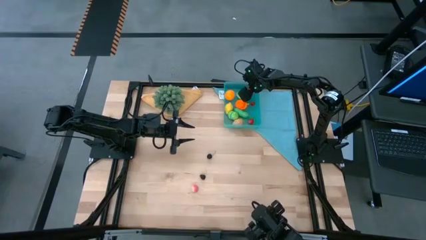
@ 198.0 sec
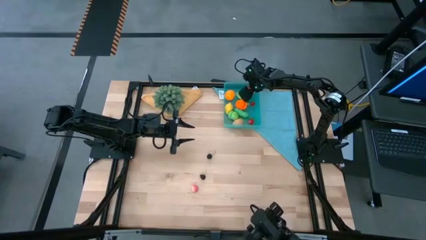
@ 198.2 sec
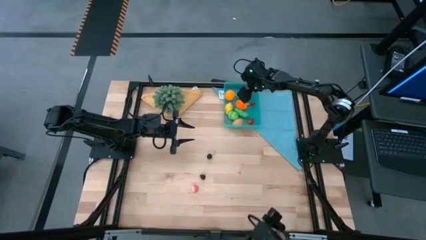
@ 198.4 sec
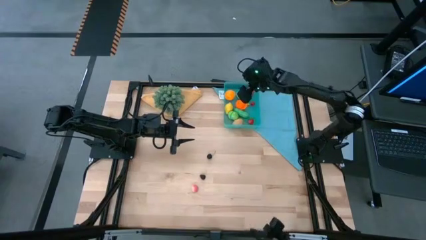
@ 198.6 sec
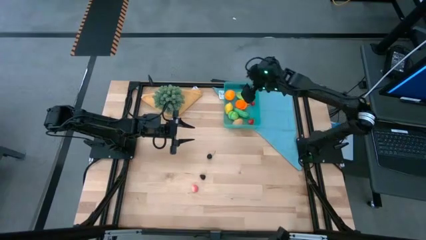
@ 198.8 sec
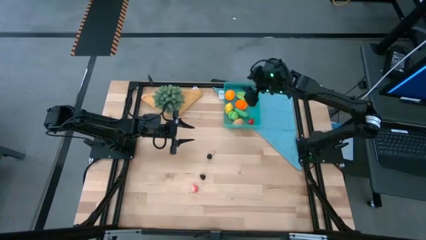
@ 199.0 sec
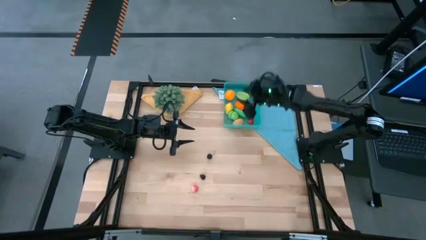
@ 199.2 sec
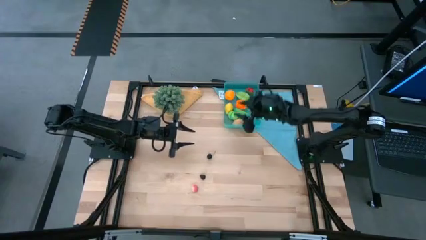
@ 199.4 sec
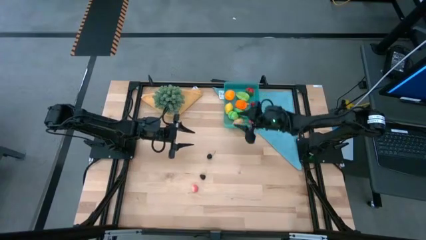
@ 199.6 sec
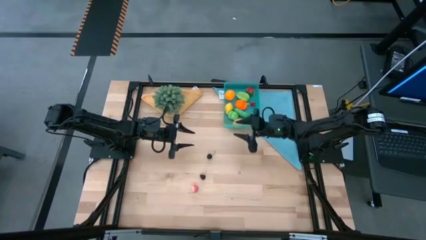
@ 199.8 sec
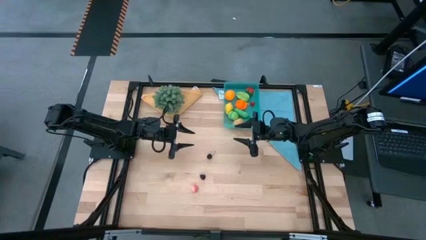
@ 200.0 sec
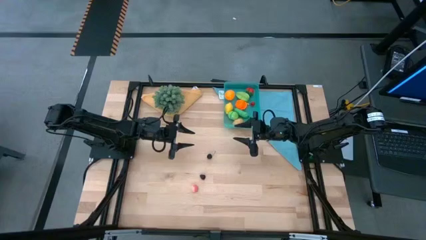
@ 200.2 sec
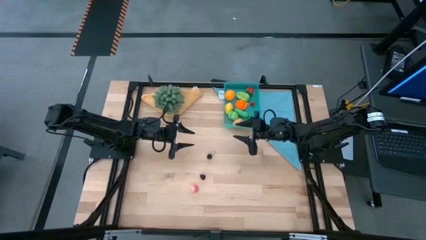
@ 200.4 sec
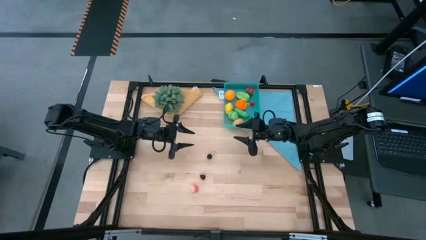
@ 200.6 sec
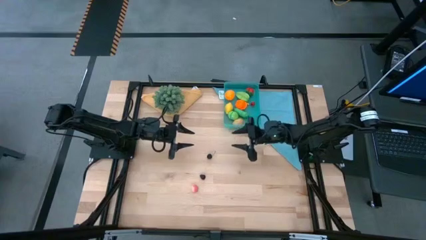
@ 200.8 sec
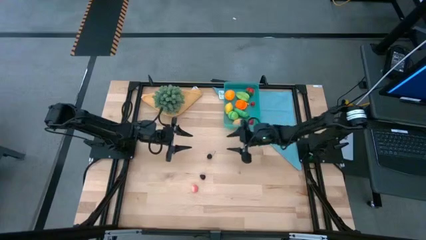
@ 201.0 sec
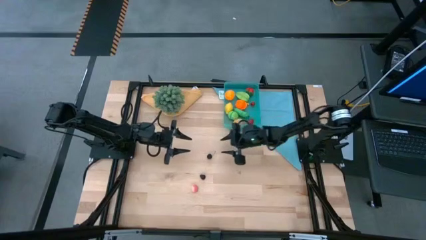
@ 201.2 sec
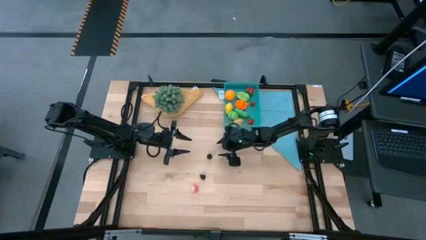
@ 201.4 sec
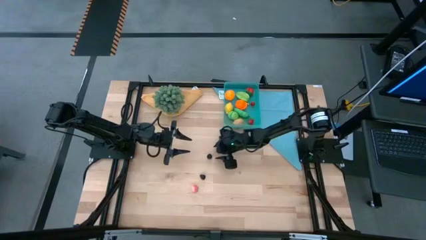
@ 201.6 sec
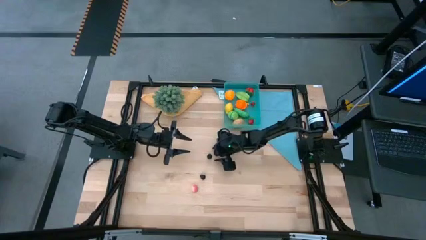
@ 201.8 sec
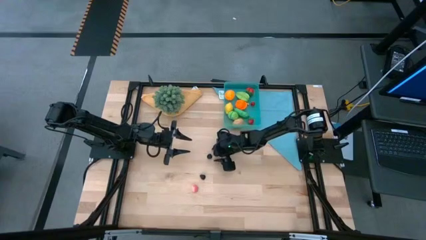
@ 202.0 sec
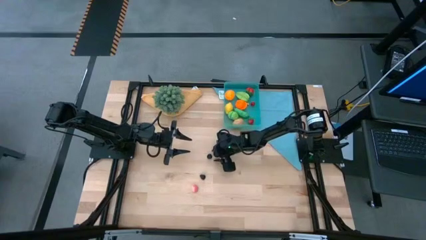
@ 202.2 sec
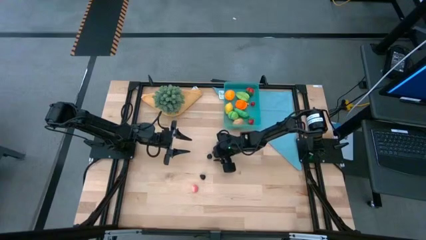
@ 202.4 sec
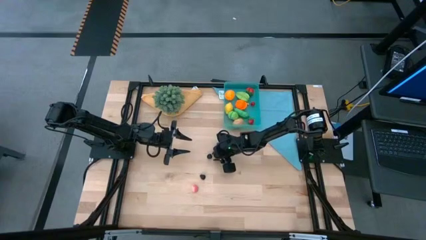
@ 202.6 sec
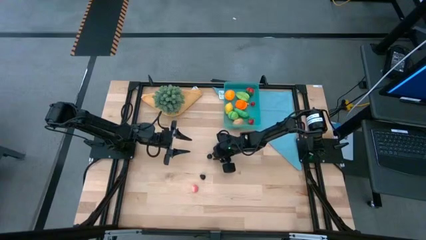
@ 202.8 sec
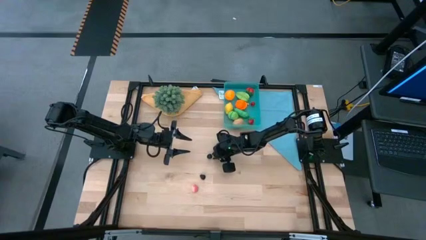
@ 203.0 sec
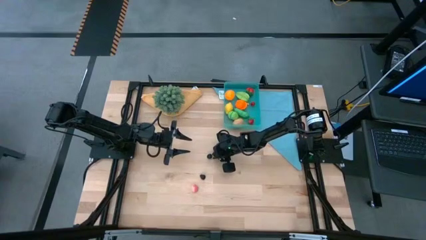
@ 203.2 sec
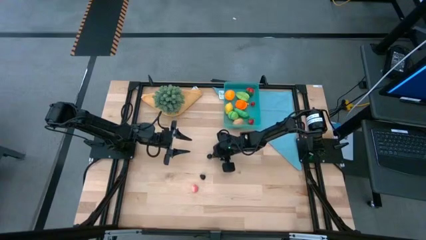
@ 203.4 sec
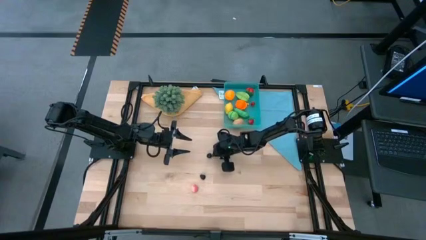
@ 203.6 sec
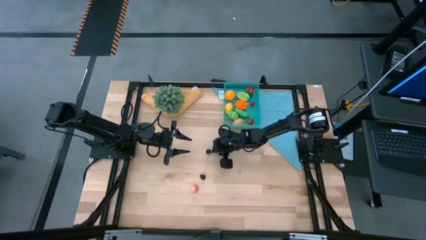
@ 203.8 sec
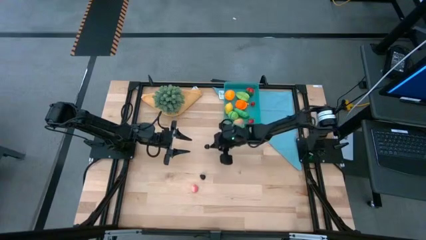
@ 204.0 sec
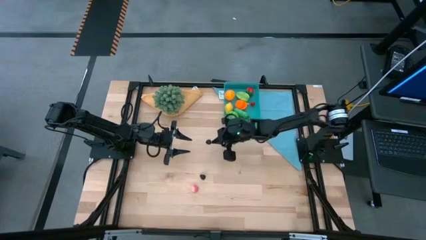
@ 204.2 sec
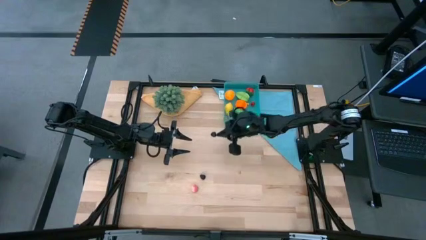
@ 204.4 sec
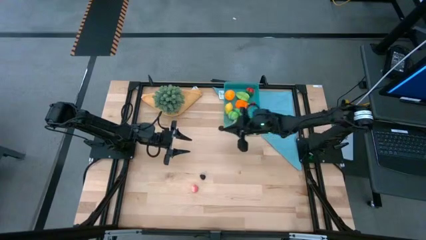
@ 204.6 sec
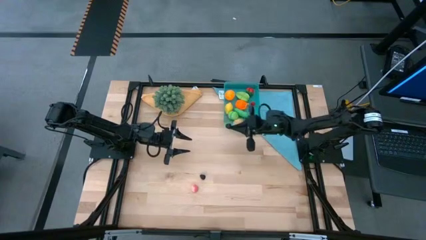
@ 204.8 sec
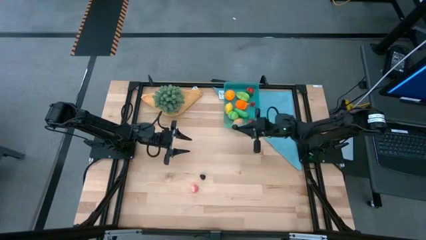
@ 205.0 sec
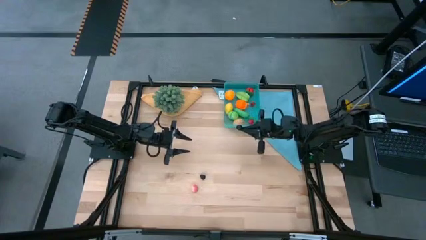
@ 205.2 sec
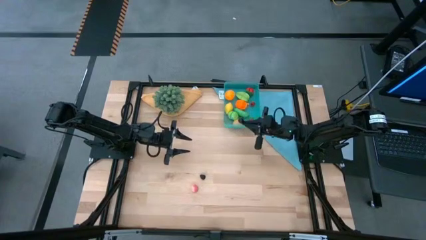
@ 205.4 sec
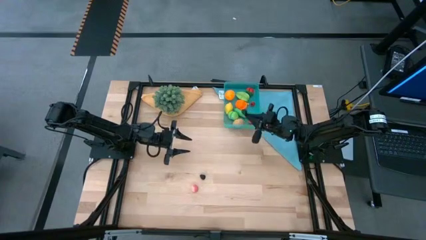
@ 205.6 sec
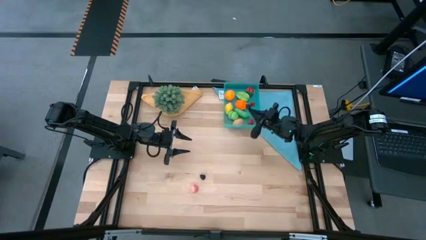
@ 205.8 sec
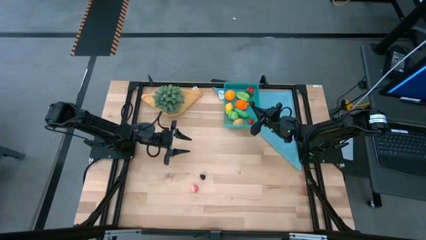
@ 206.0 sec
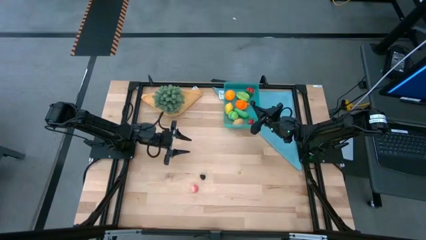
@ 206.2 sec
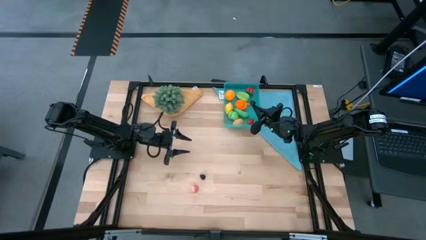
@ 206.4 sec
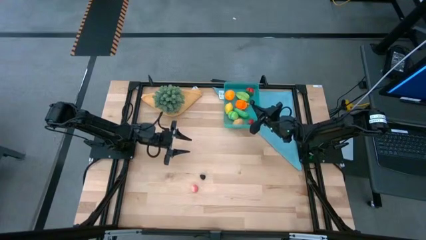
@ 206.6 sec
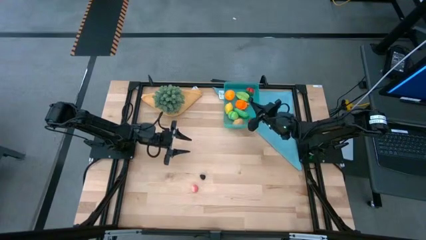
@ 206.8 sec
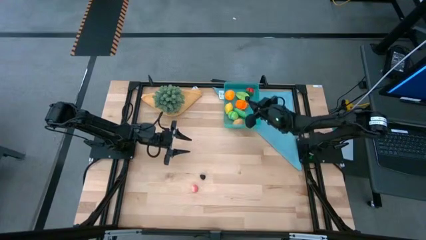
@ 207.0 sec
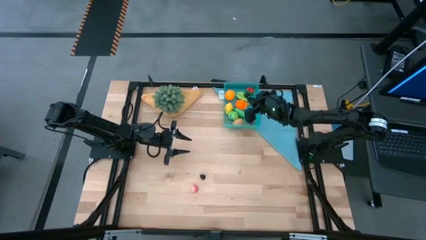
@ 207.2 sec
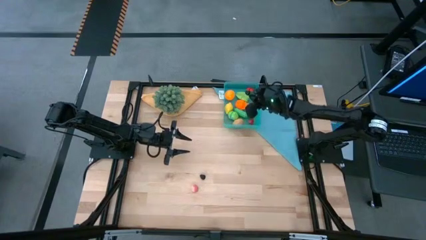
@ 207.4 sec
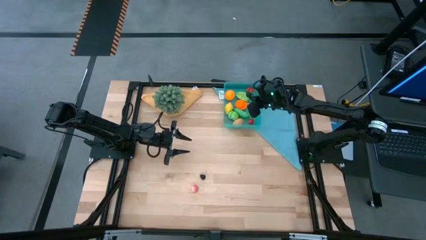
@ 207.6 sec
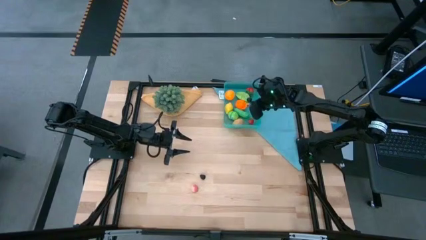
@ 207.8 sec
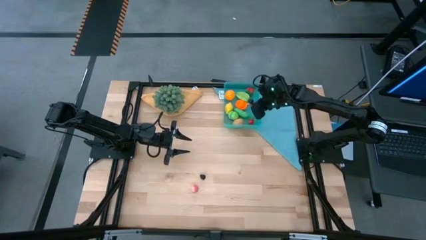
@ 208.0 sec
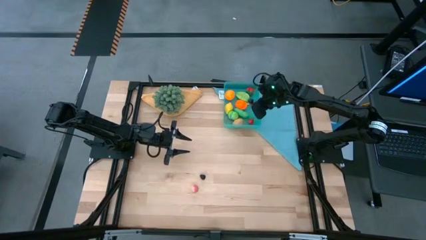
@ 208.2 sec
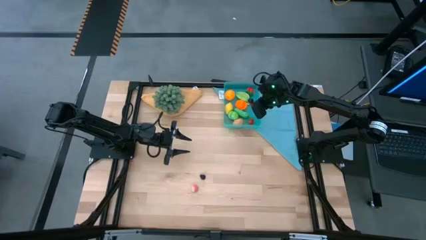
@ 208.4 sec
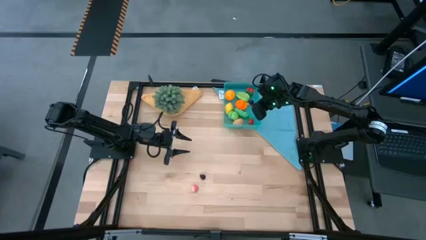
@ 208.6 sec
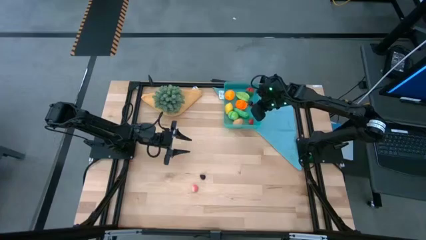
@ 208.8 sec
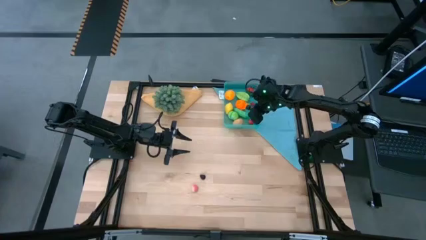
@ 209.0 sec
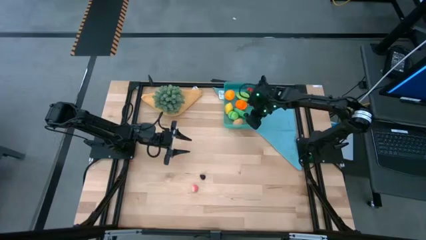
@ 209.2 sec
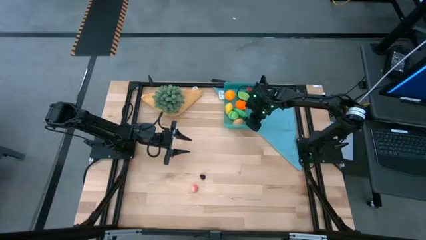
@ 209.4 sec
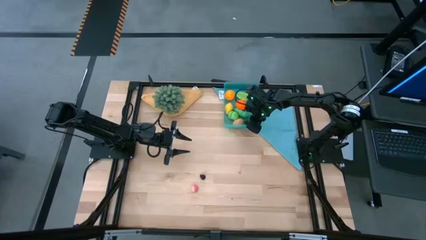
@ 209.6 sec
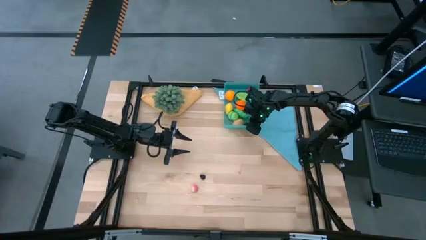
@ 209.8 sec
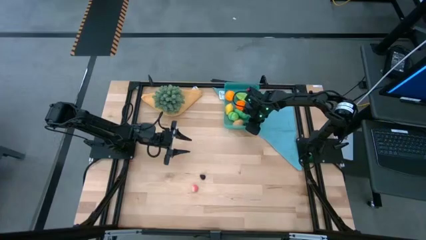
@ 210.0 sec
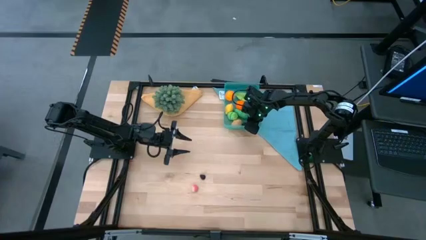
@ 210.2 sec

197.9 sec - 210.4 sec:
Task: Pick and placing Produce into tupperware
Put the black cherry into the blue bin

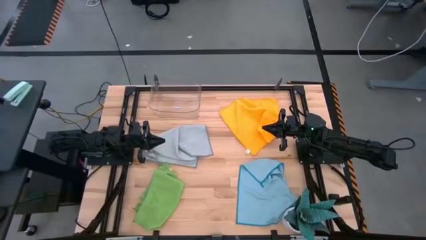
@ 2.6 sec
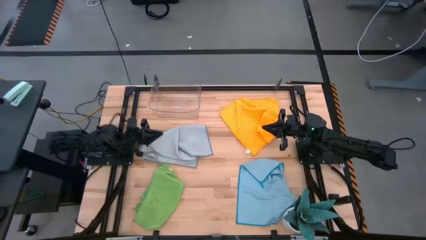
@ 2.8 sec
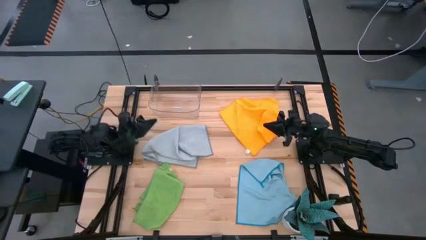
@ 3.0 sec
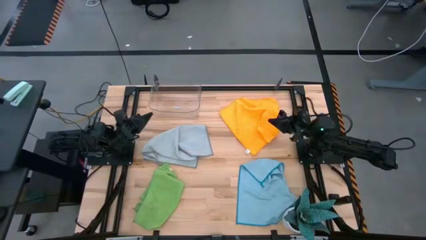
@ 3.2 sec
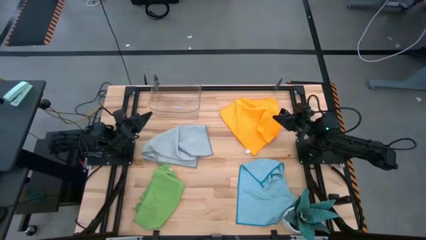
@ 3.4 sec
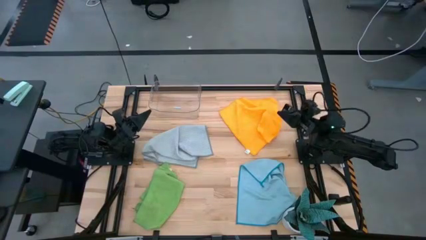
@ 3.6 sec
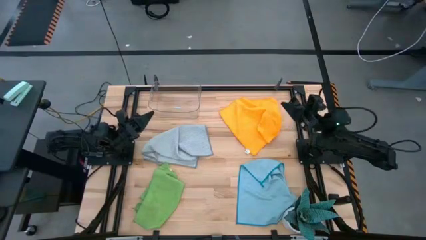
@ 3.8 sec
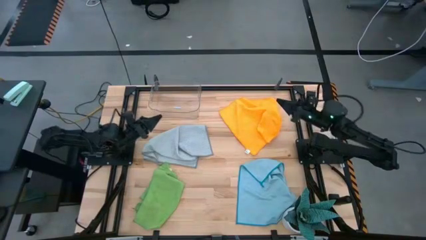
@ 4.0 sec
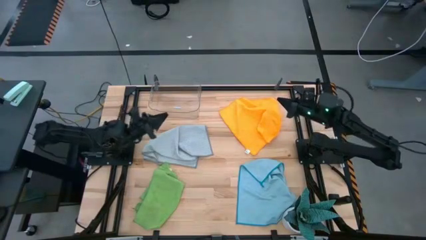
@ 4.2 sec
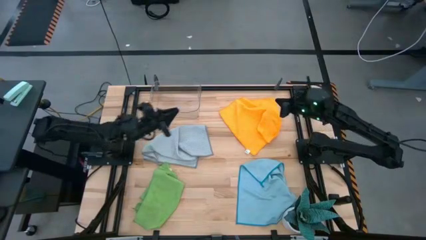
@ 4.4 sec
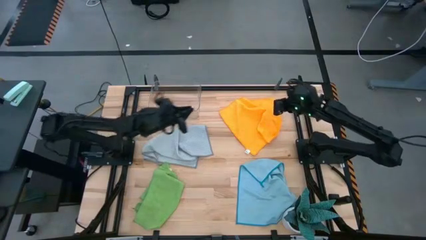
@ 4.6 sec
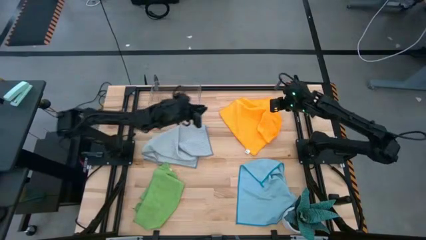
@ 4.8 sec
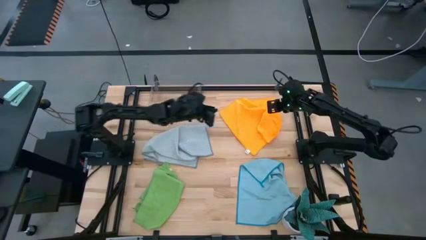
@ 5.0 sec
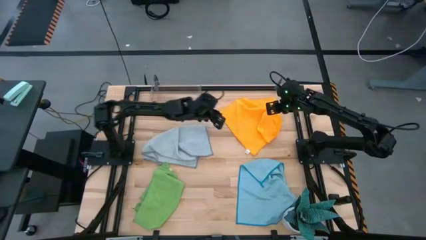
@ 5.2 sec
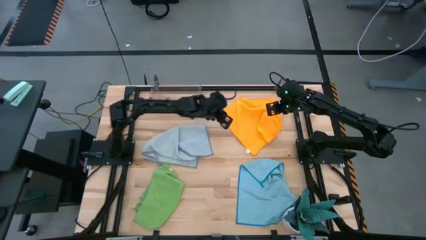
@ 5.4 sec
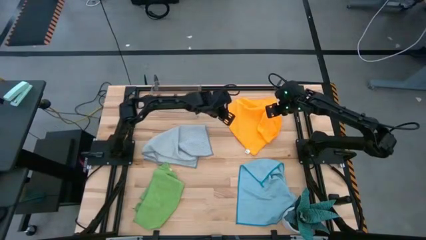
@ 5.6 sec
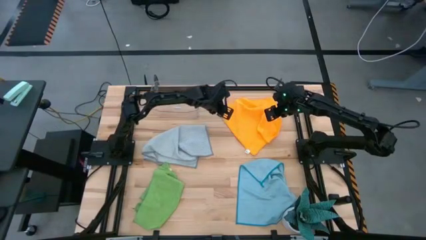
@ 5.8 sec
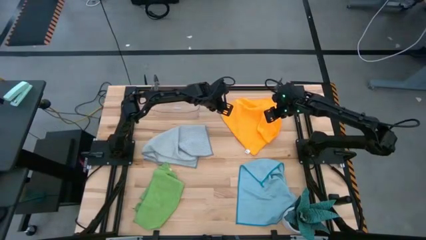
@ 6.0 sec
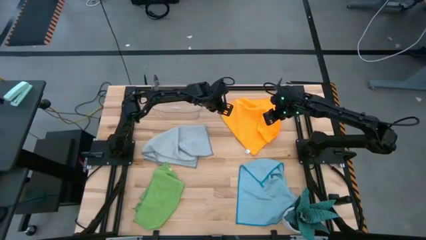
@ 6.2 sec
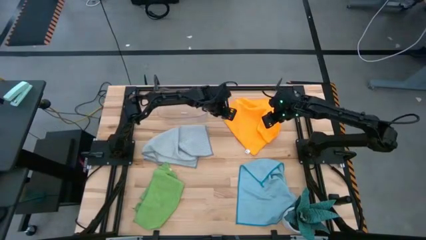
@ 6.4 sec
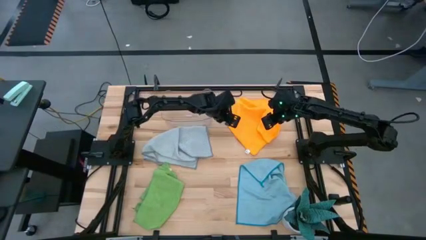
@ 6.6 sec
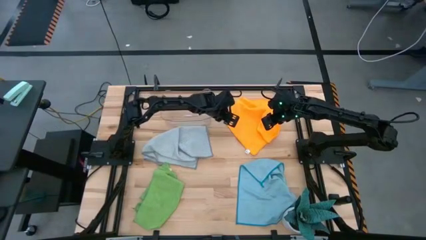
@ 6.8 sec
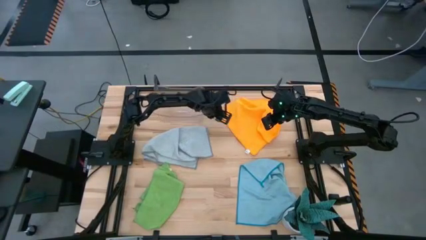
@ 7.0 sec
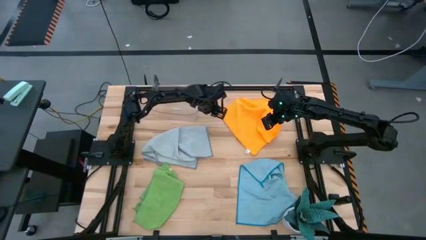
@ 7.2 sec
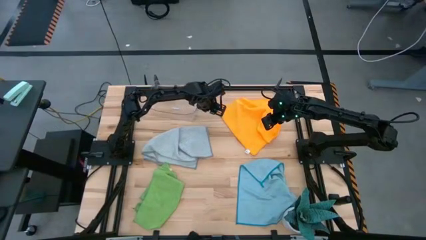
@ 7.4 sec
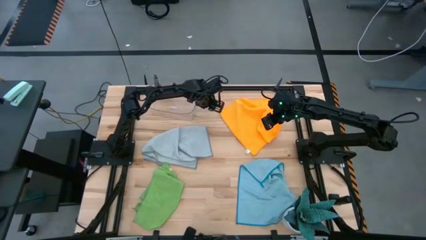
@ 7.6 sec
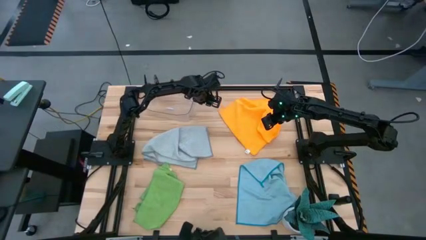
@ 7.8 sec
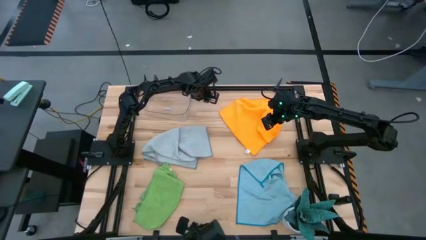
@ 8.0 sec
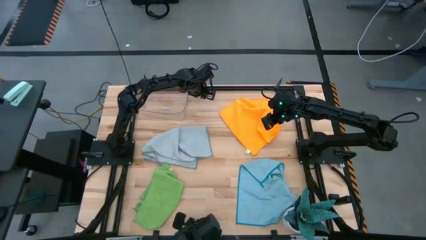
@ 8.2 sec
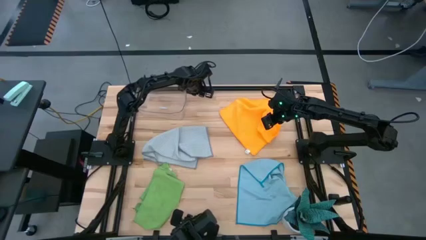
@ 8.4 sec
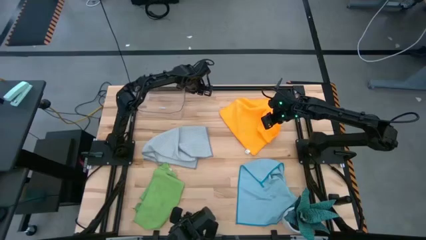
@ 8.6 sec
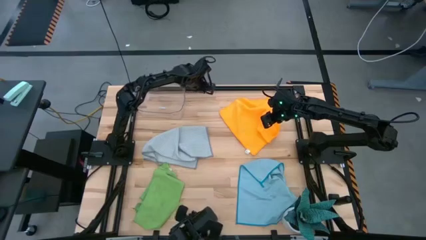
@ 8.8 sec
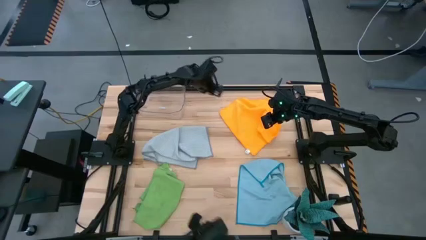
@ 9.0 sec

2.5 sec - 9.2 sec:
Task: Fold microfiber towels
Adjust the transparent bin
